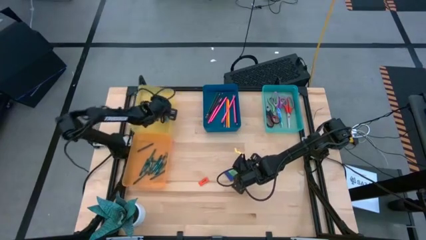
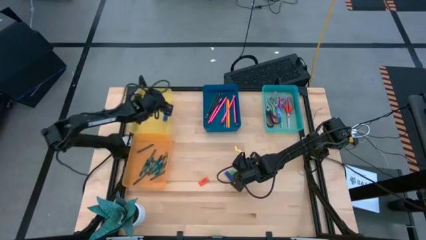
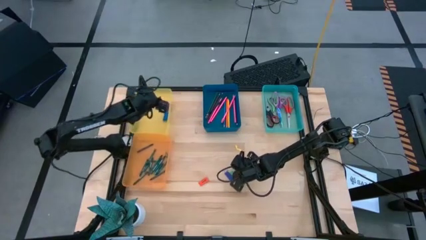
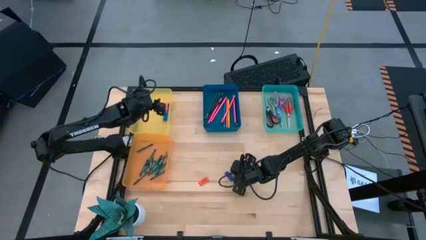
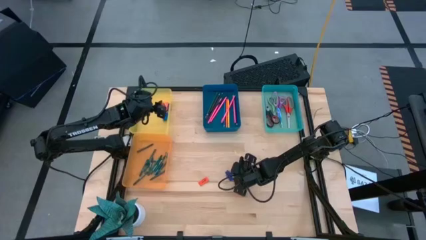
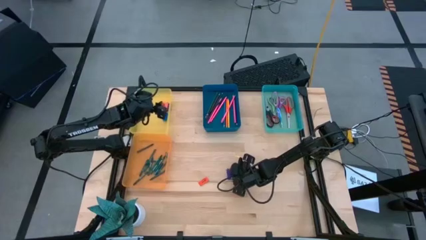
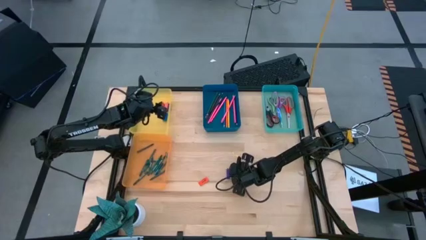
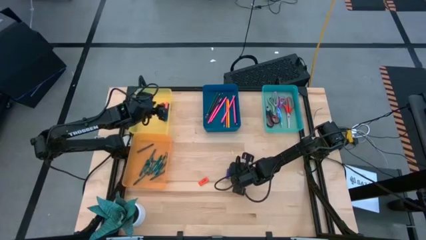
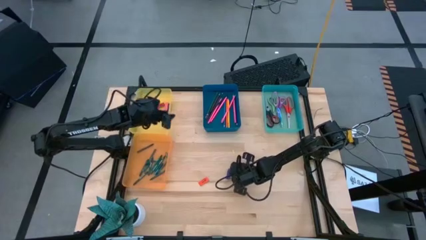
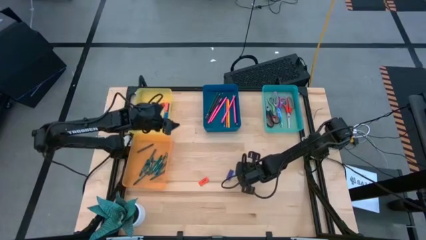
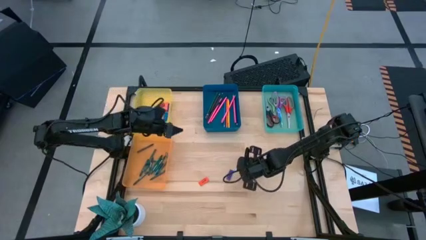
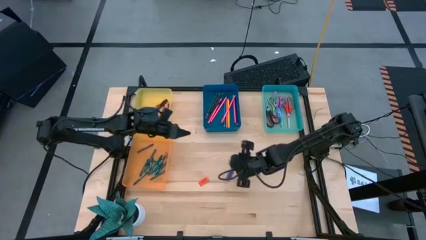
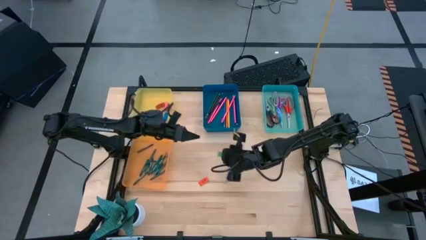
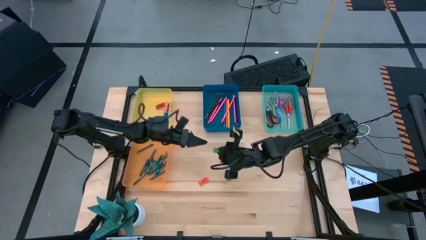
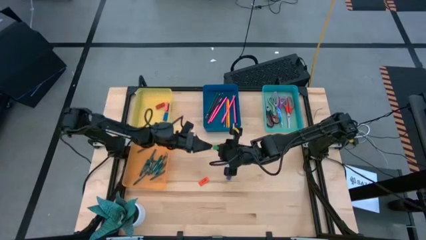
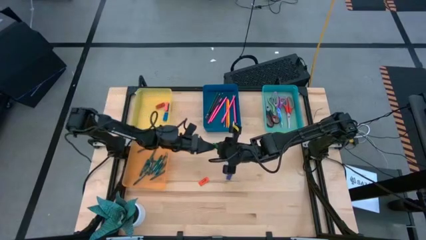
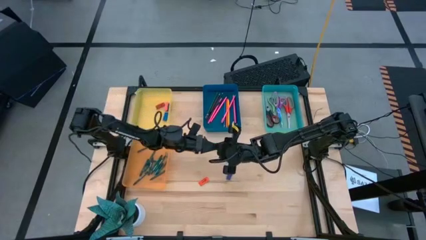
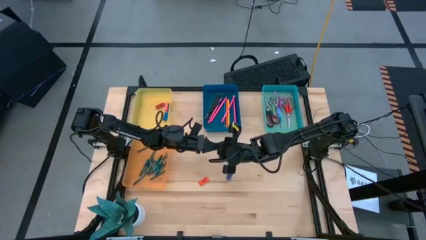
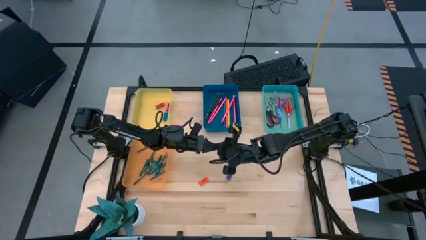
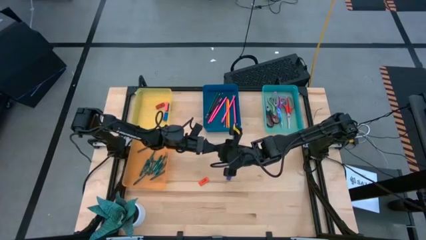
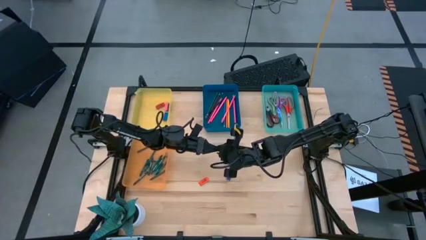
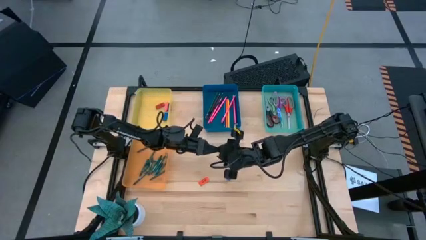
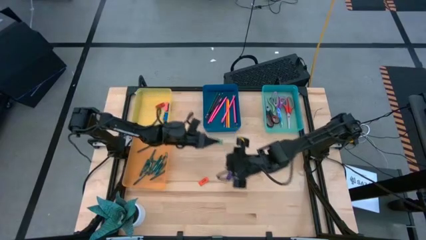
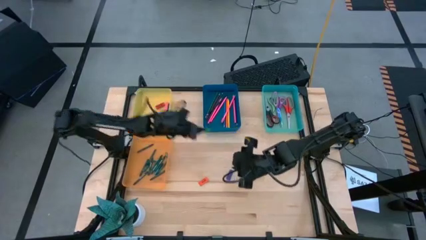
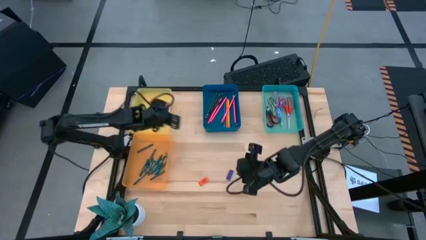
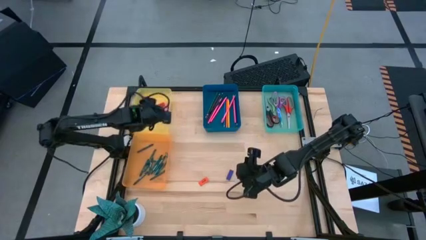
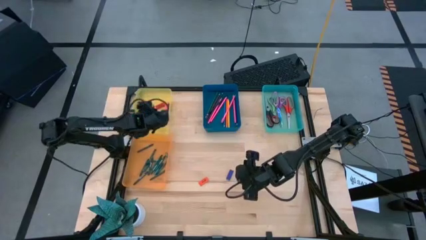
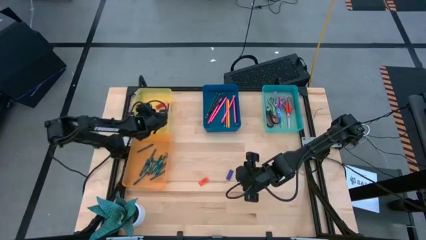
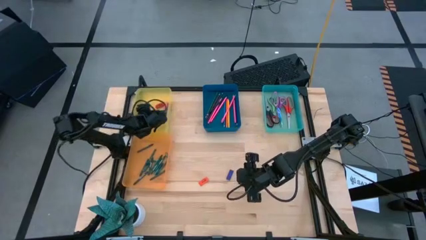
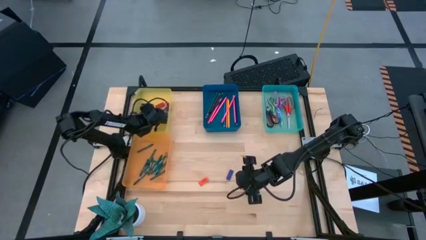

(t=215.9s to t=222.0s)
Task: Sort crayons/erasers/pens/pencils in bins
Put the green eraser into the yellow bin

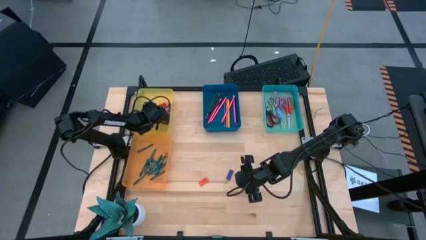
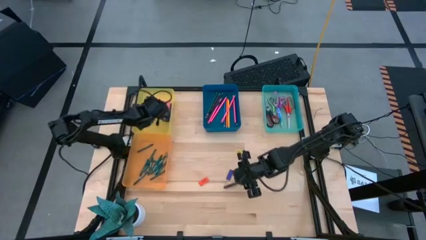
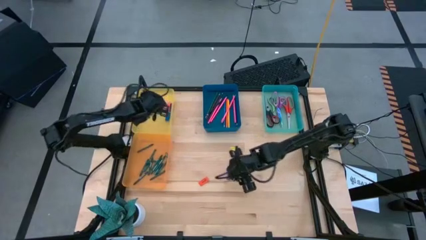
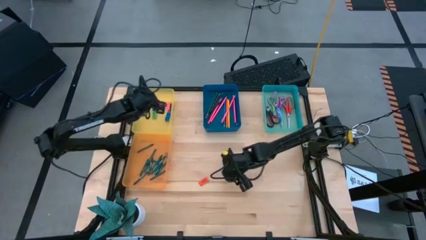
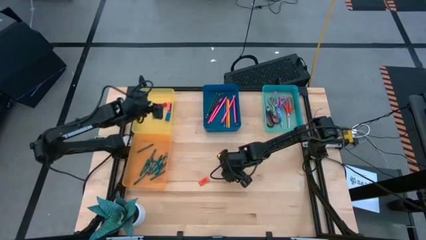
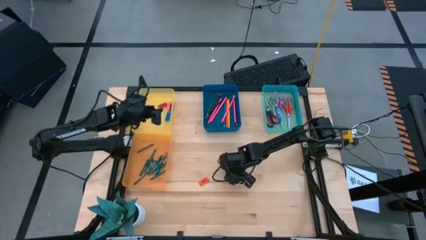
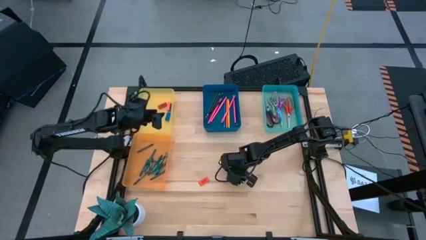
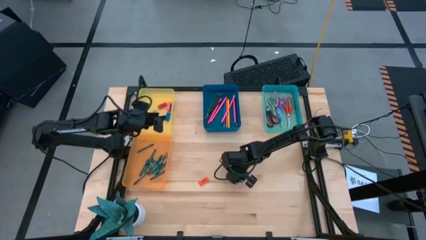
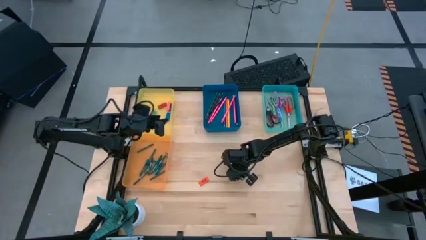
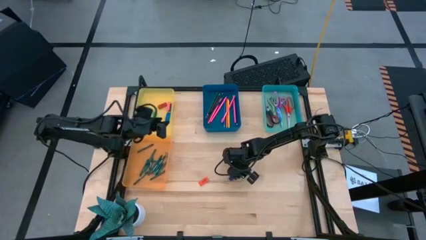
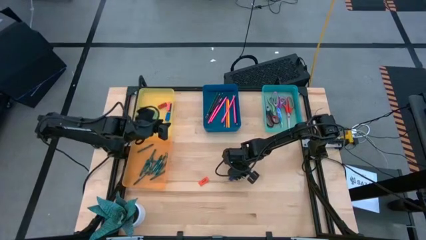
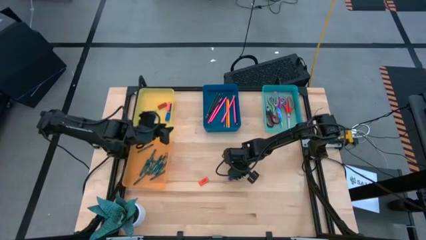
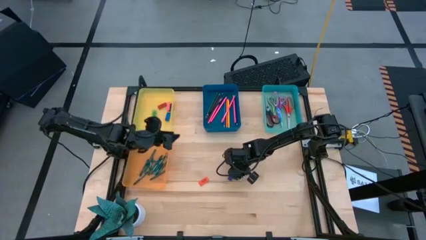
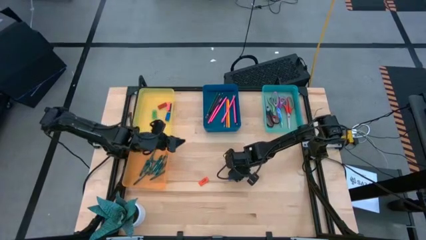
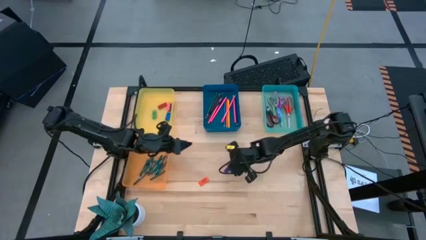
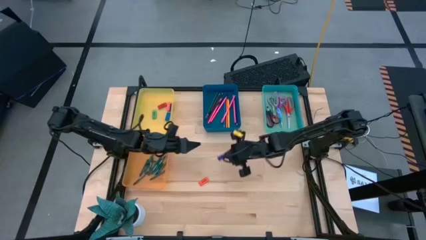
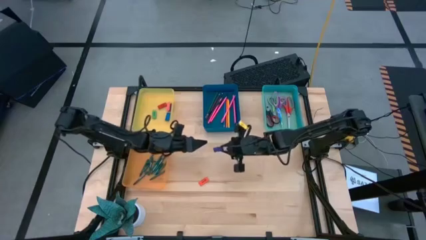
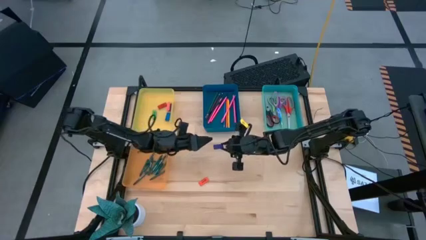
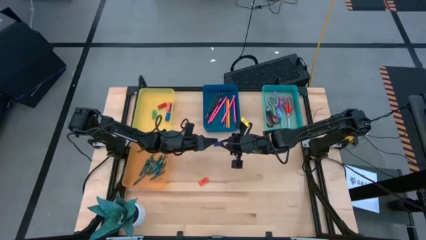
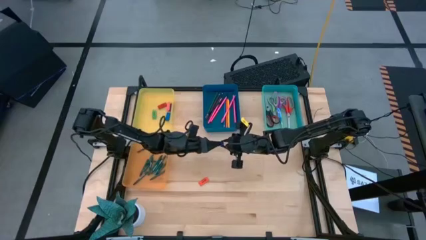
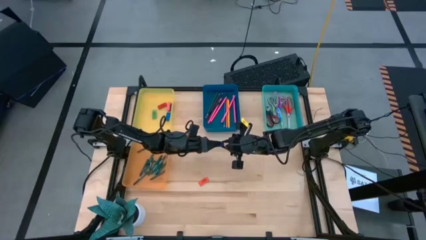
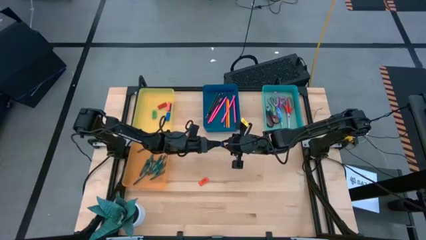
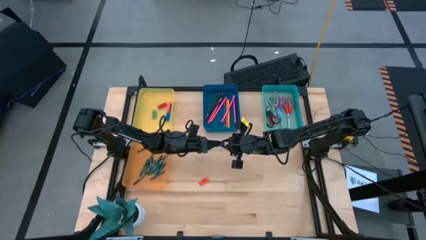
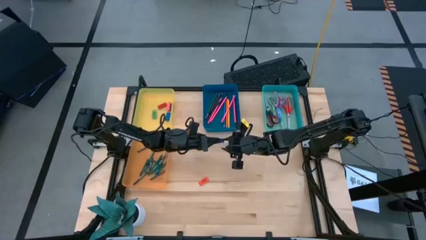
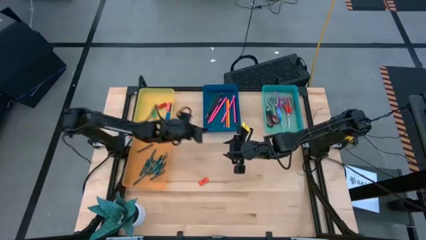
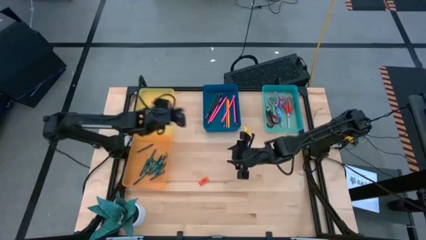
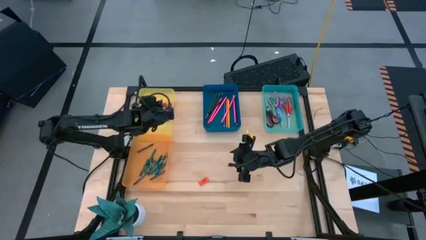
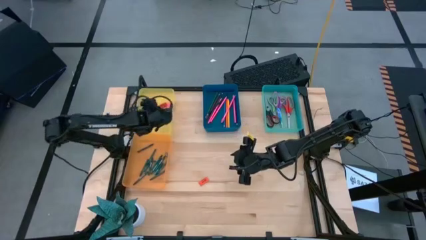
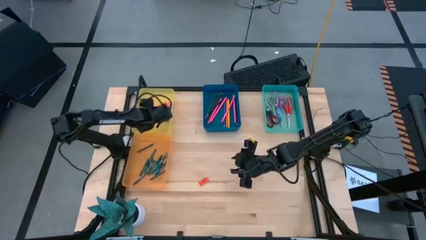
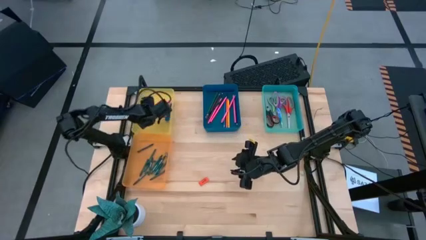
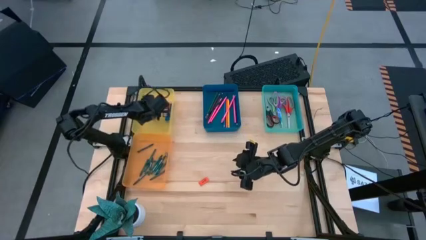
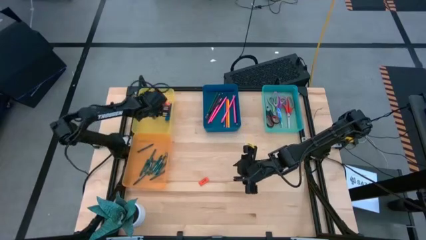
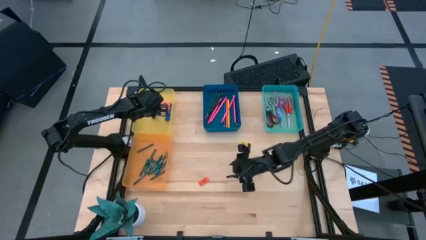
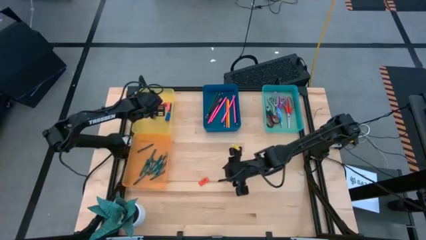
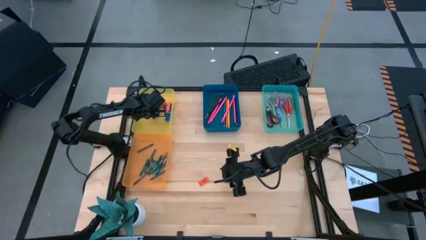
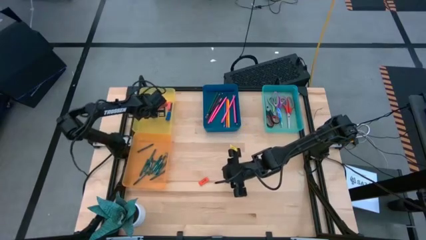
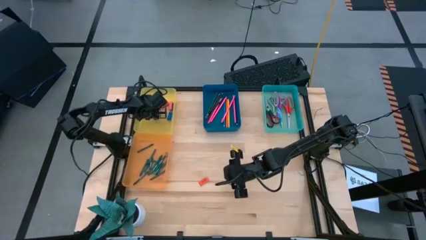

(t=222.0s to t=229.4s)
Put the purple eraser into the yellow bin

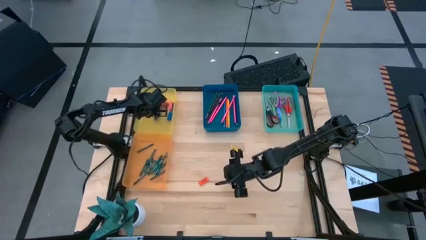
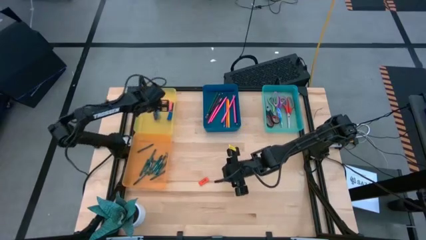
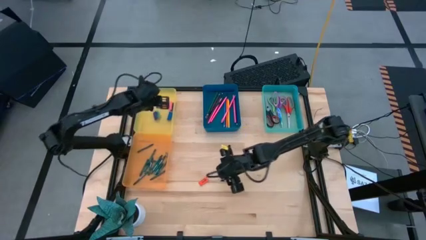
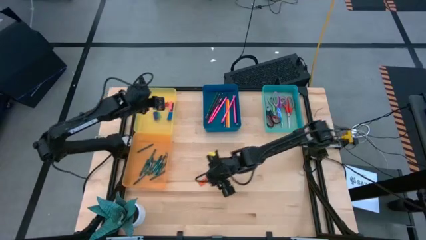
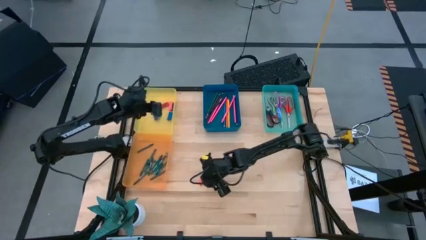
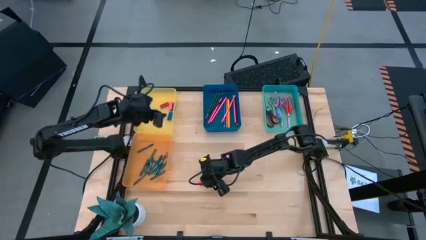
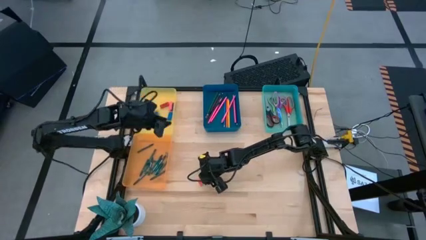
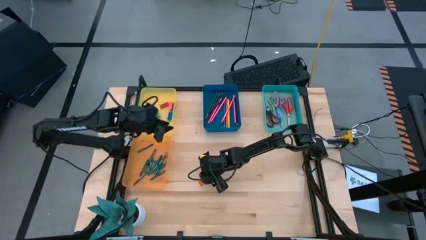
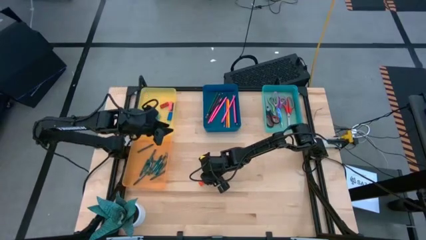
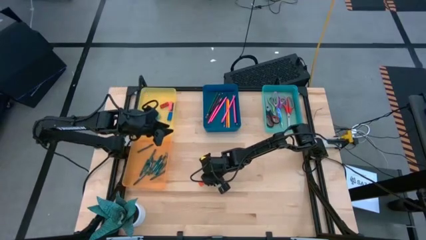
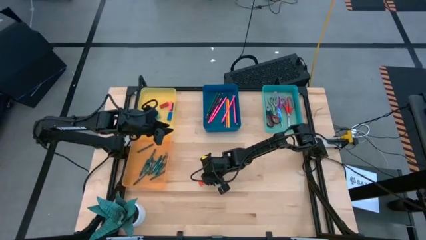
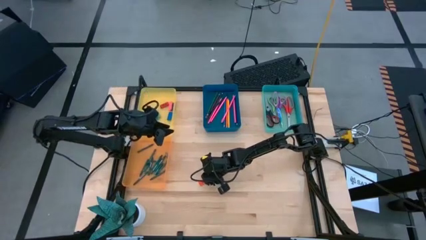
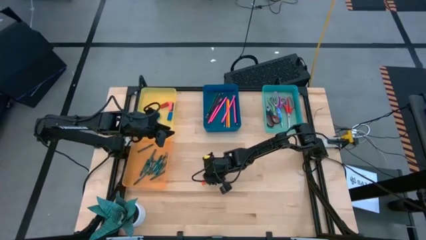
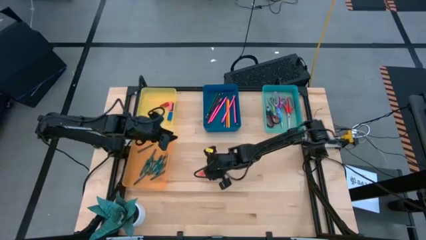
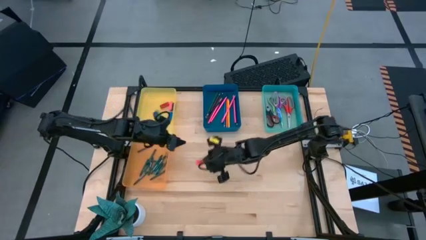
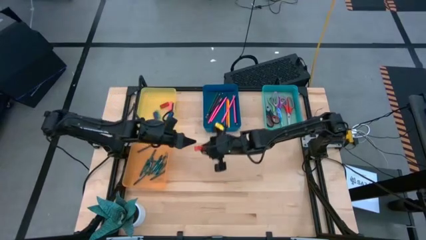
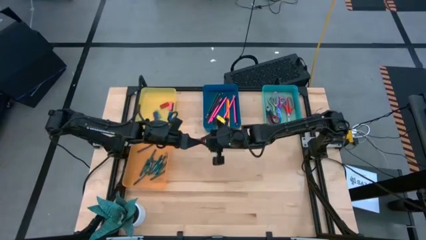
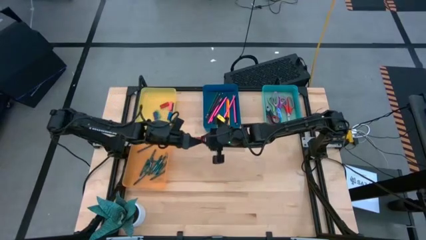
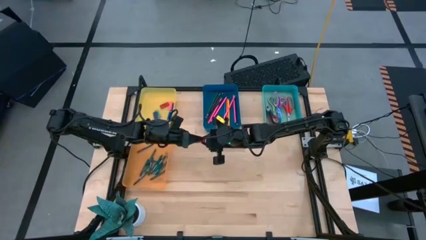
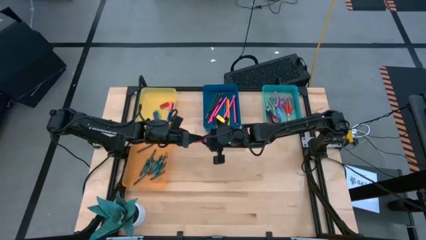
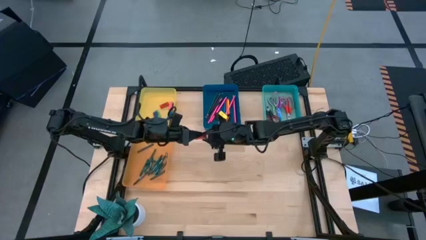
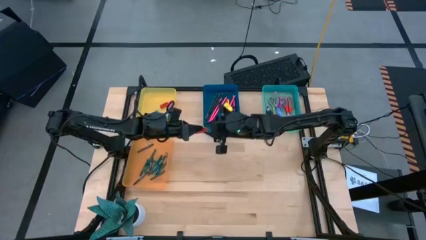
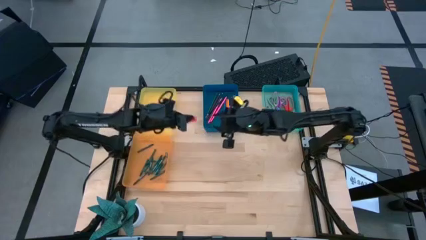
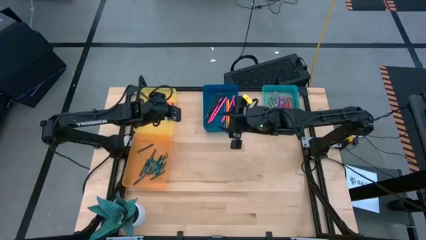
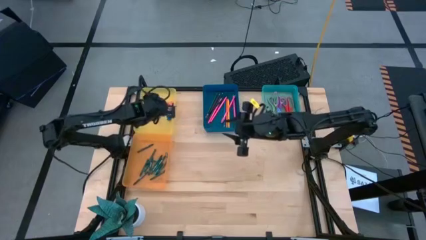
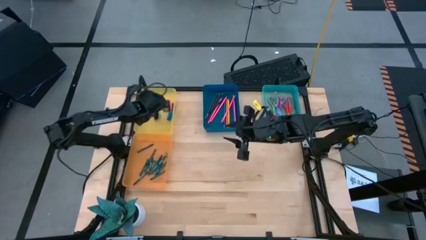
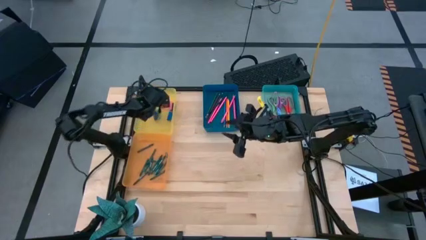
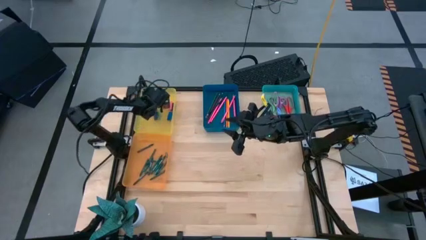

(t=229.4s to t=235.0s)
Put the orange eraser into the yellow bin
